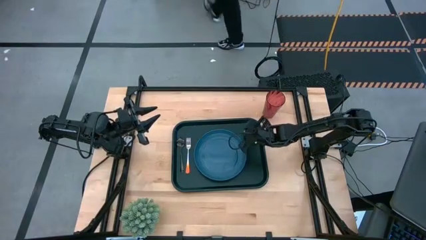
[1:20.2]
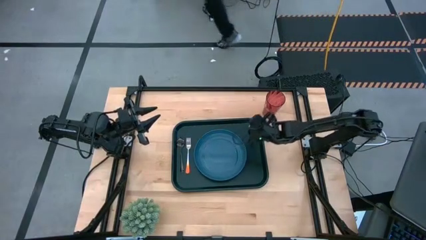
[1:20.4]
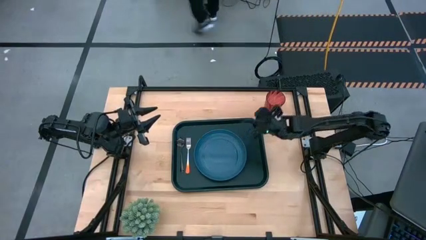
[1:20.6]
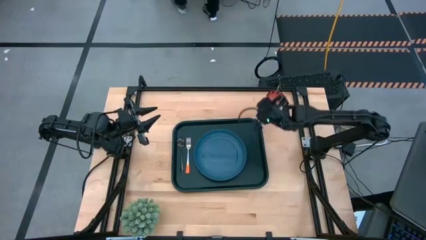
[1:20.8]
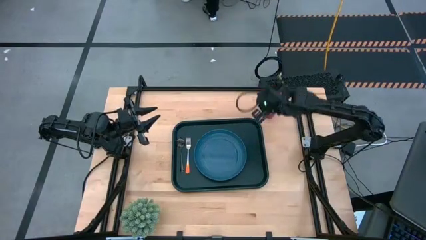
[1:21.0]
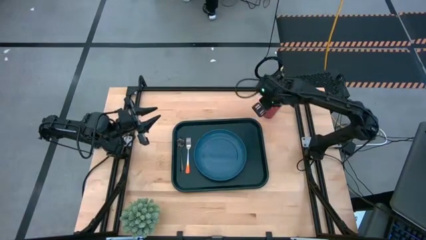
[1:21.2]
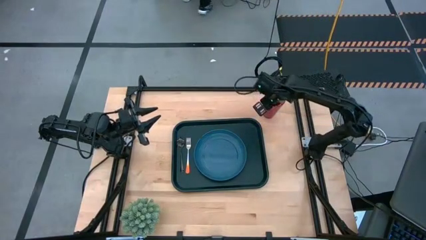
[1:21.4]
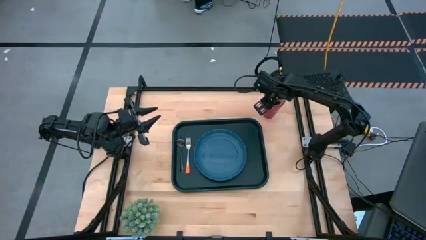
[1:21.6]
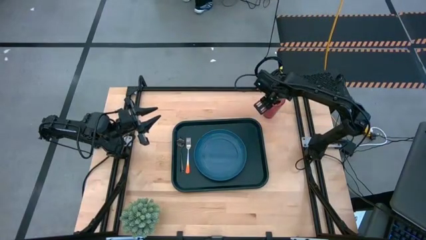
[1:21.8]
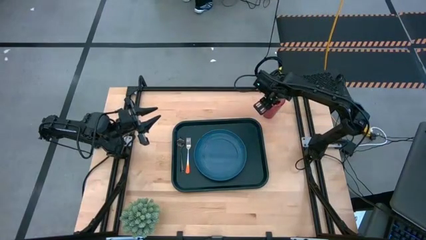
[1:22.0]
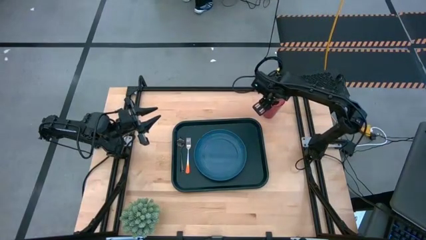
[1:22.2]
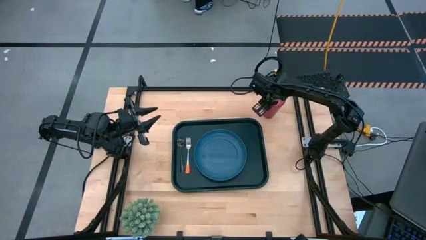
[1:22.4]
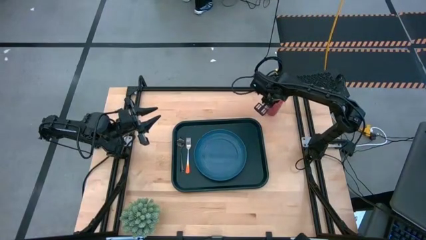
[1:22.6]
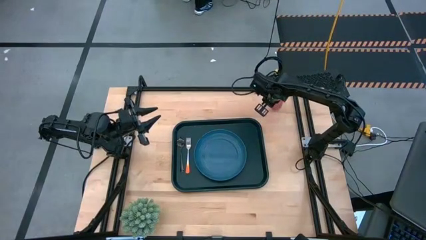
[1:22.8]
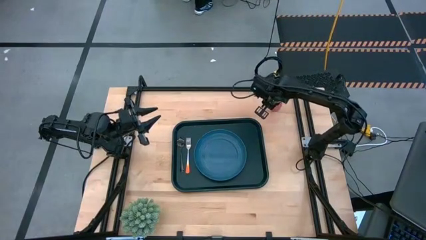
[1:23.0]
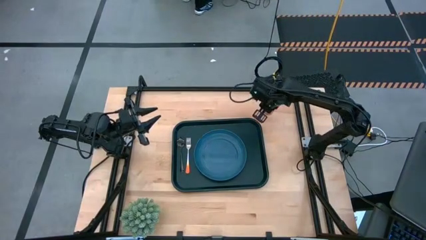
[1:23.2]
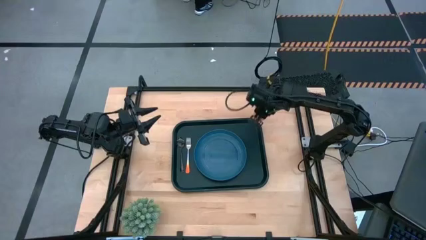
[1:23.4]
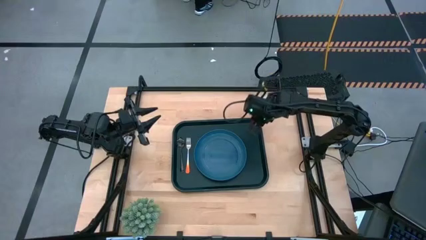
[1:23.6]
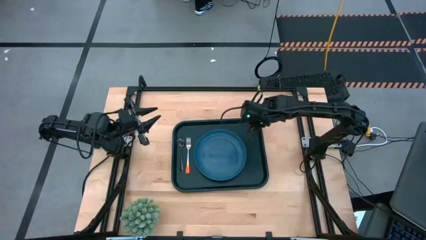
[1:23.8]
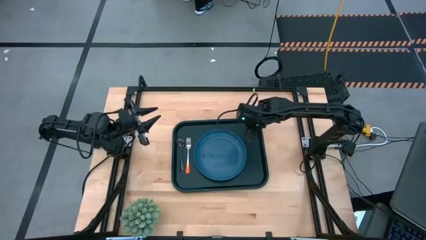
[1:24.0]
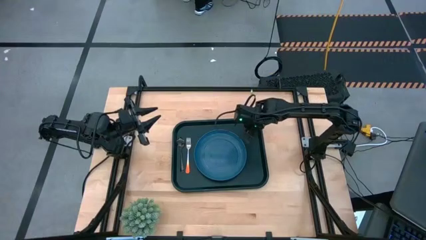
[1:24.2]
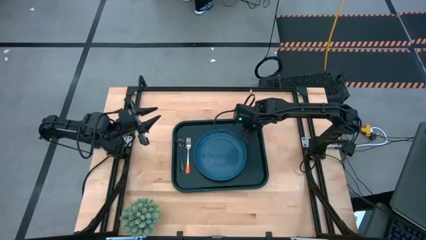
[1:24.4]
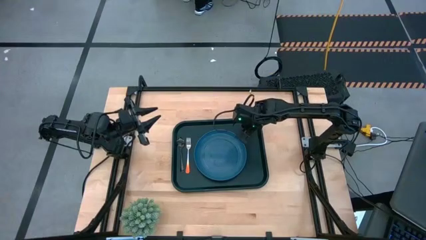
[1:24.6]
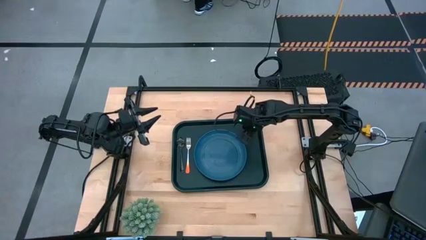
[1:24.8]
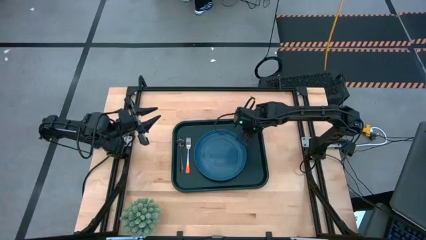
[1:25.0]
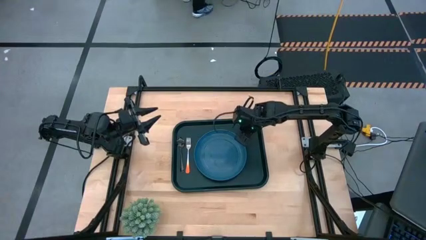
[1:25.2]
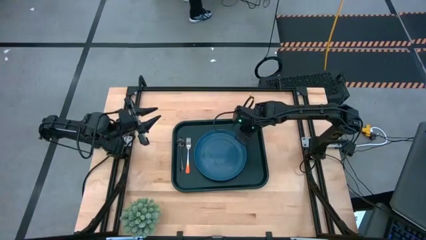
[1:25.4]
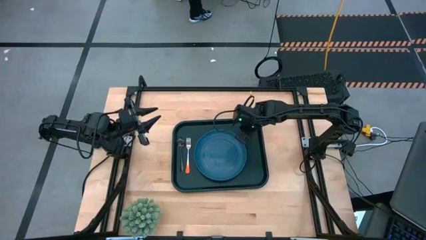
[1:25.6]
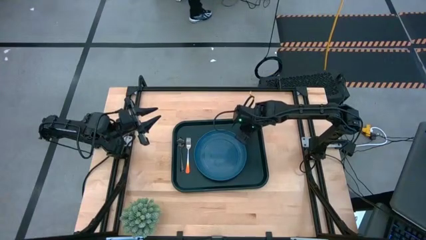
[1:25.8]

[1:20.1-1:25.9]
Task: Pick and place plate/cup/fork/spoon on tray
Put the red cup to the top right of the blue plate on the black tray

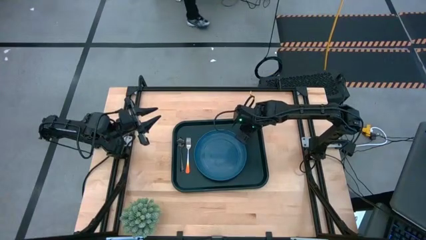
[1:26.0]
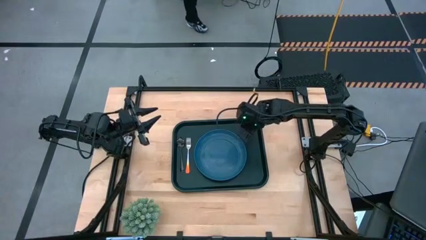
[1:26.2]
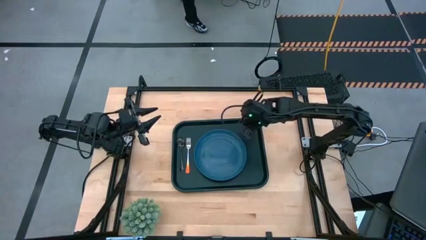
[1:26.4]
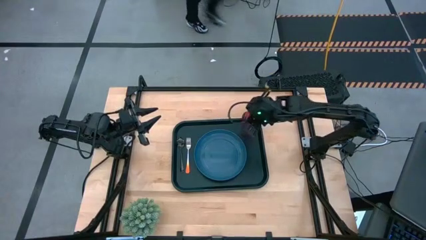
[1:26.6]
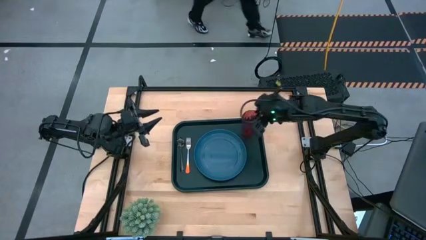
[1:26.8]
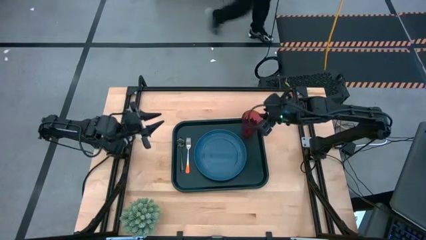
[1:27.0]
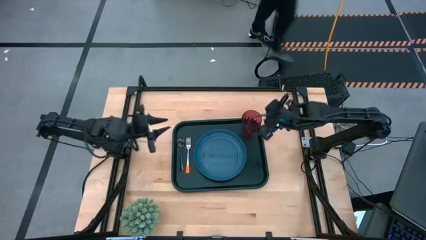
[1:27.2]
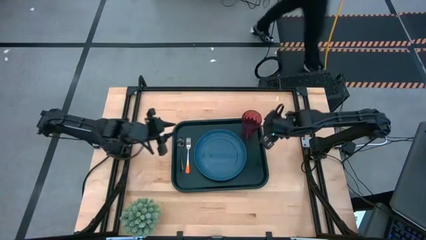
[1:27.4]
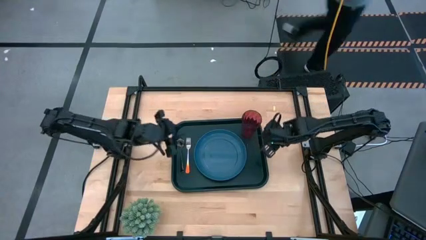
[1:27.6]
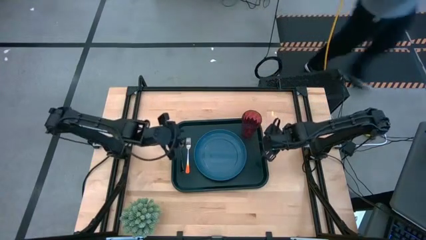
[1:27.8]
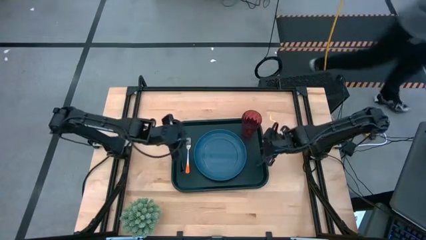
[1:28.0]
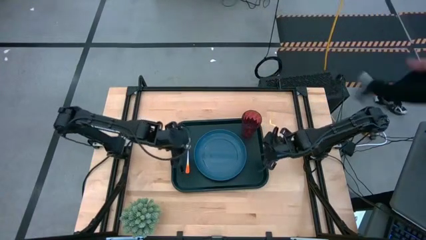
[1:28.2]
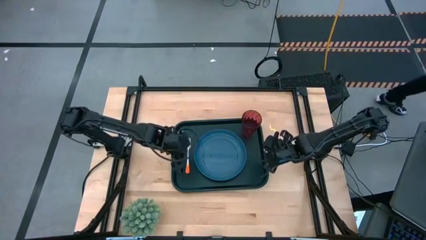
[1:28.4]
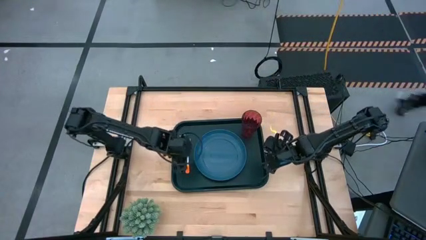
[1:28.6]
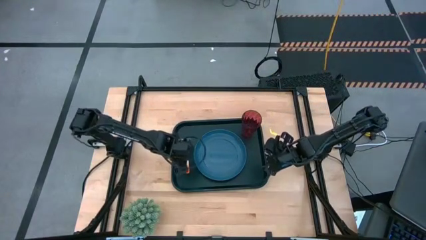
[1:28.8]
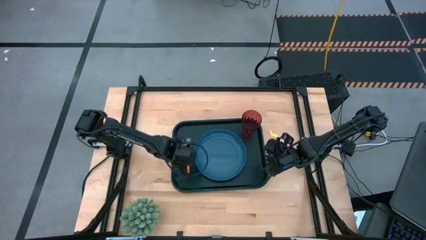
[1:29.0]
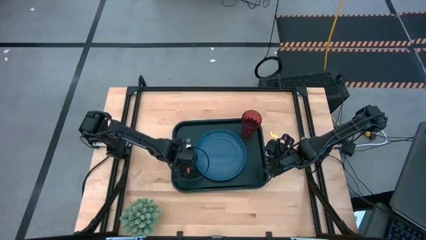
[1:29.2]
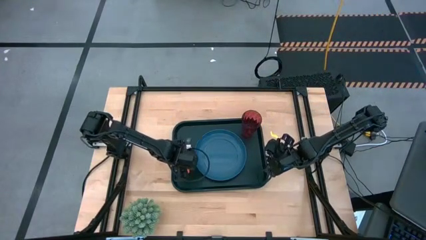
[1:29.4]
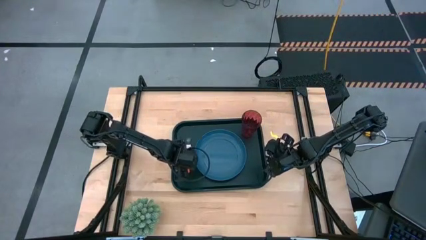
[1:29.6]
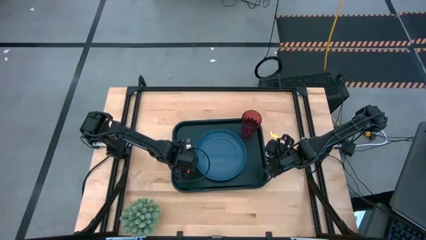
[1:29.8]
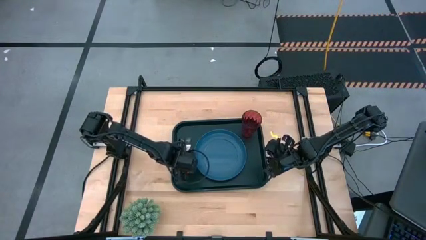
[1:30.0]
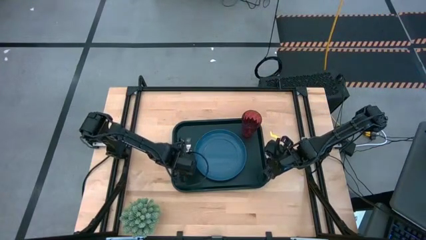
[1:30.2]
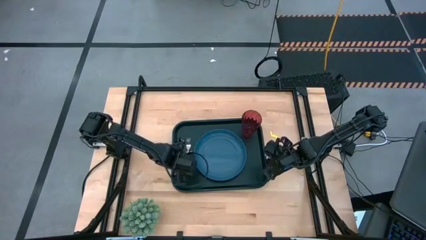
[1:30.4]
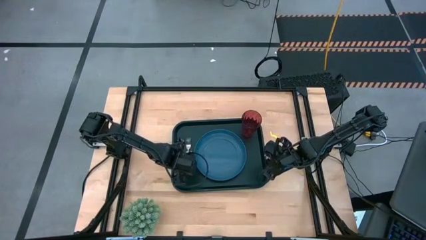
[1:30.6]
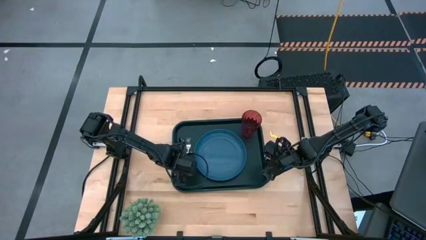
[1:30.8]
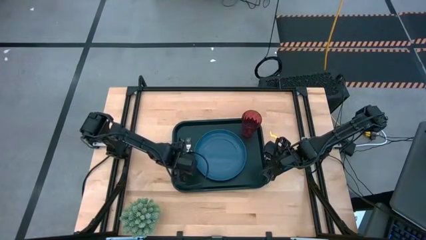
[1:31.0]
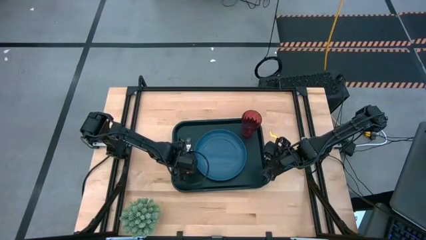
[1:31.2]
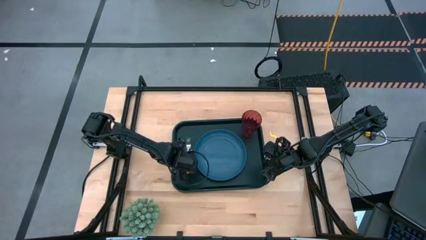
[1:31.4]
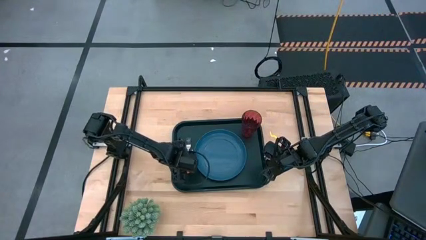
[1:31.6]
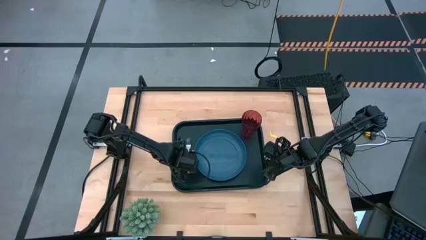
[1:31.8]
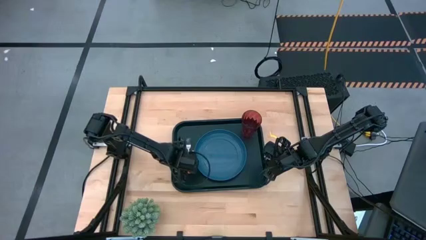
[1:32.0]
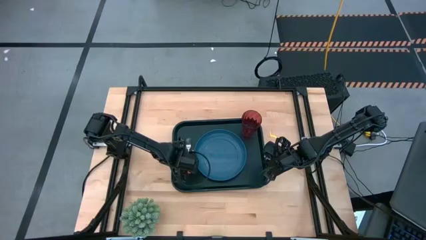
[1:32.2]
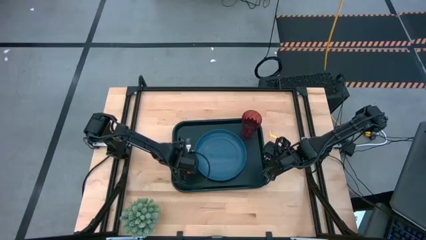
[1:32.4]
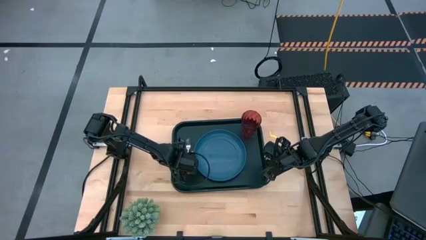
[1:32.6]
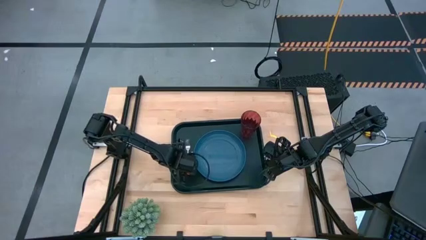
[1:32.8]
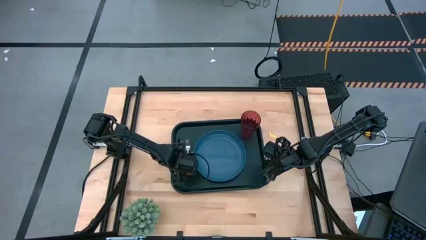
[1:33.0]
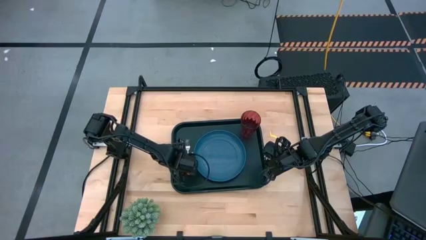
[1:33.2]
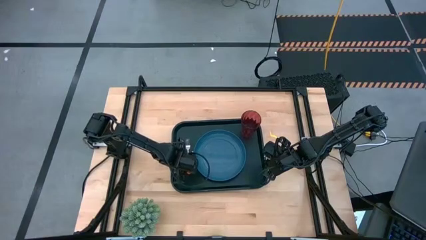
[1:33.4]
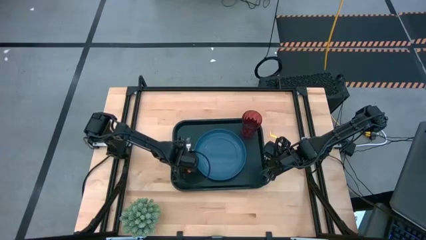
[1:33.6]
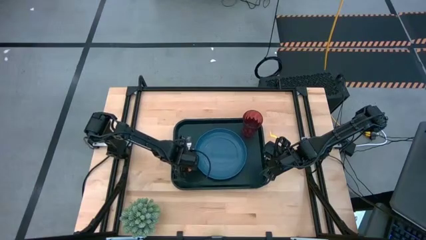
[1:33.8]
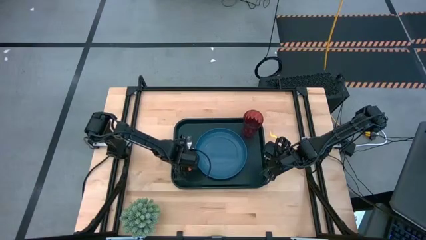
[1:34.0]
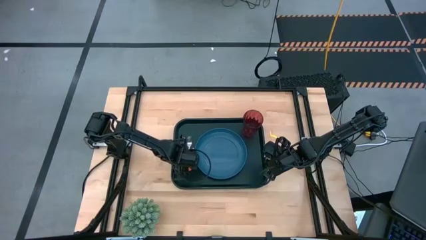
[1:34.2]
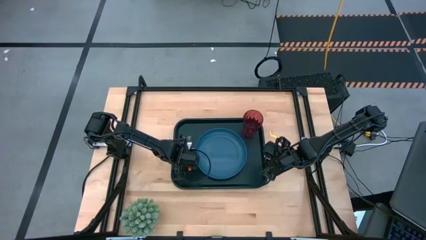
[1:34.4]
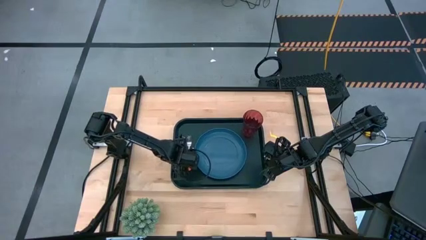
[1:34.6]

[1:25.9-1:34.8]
Adjust the black spoon on the black tray

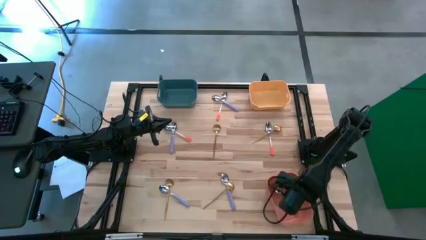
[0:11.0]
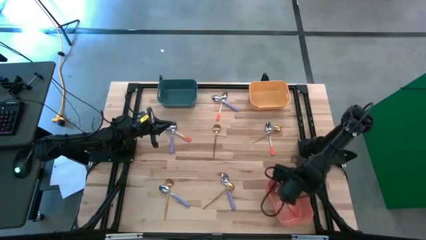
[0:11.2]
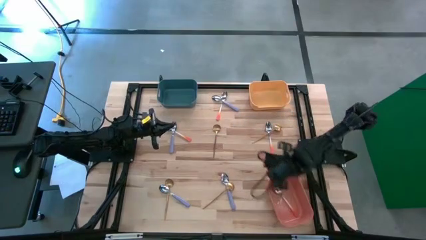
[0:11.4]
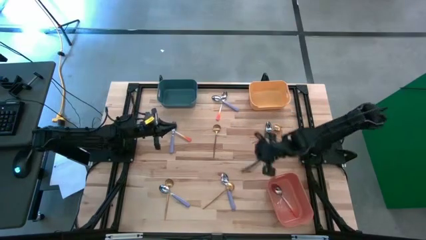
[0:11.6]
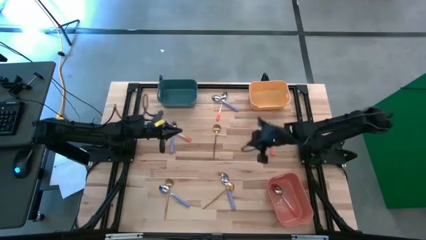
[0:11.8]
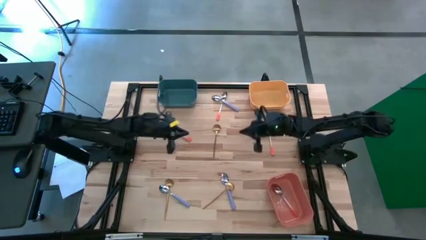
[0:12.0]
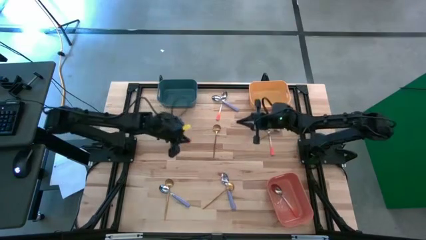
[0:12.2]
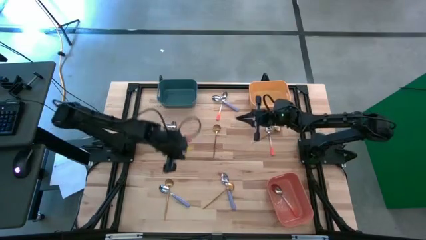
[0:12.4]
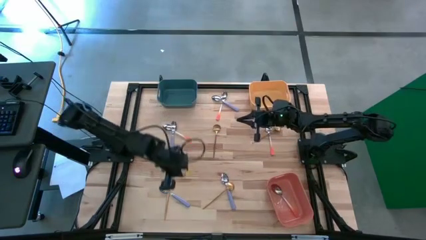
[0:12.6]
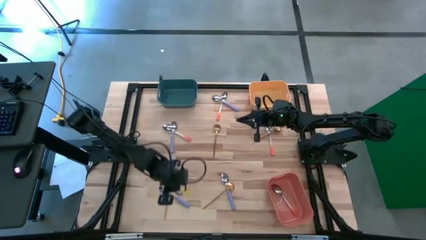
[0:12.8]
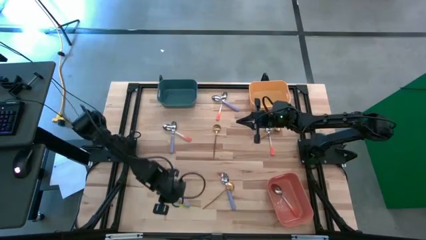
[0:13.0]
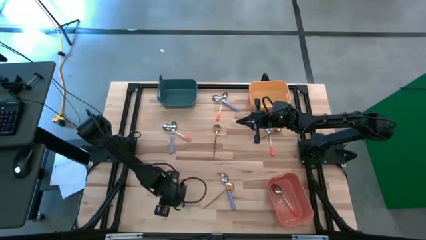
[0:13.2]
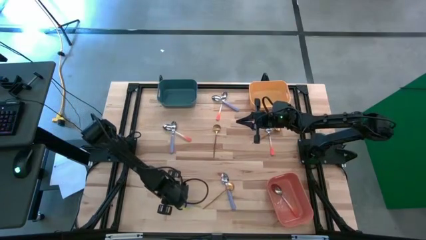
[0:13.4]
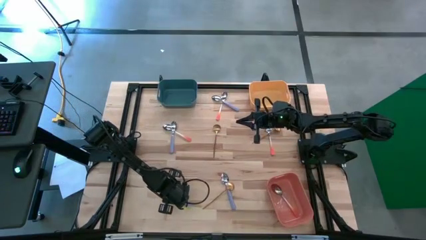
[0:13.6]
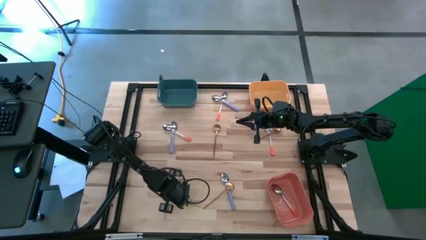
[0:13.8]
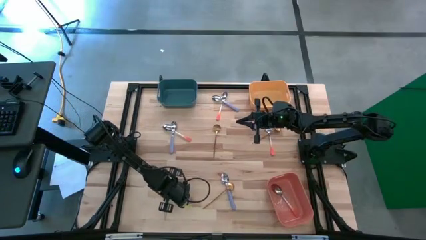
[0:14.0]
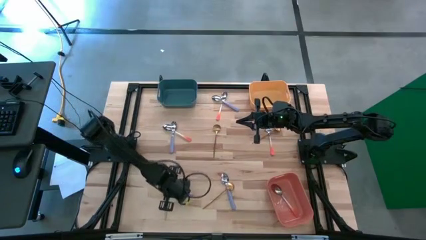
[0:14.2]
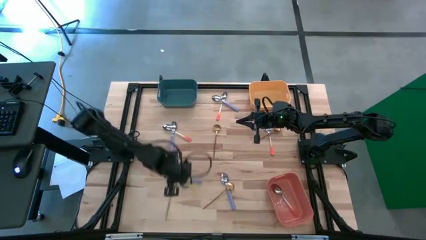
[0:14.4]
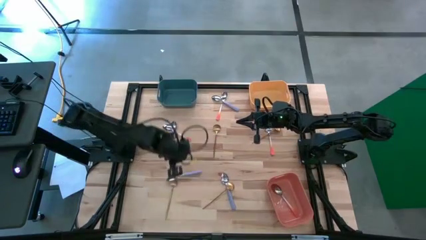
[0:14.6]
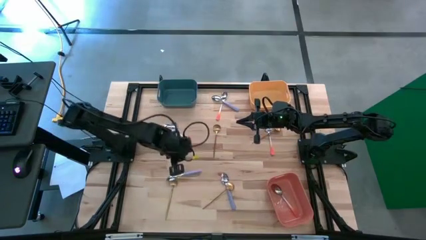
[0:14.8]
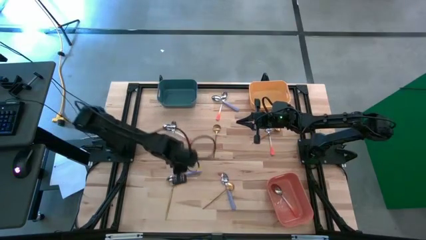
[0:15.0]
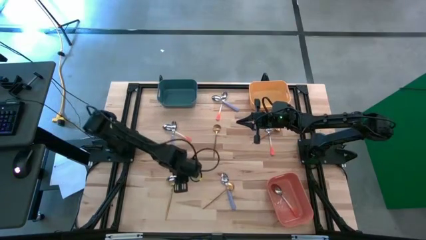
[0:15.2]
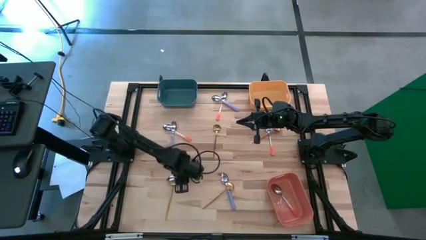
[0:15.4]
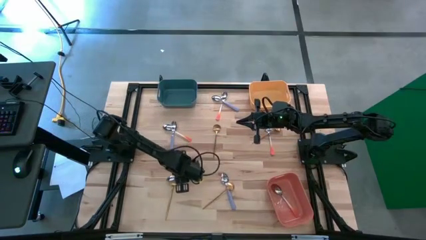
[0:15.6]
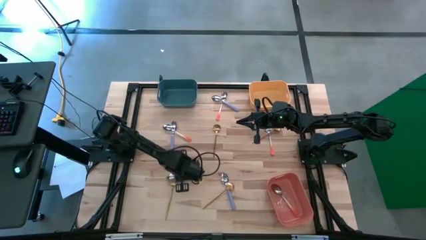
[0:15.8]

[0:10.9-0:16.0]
Task: Sort silverware by color (type)
Put the bottom left violet spoon into the dark green bin
